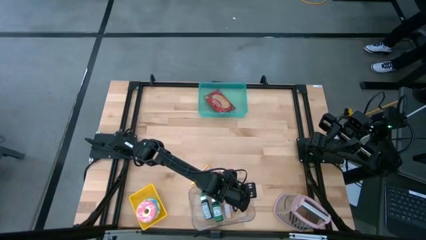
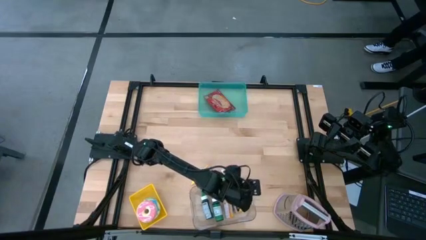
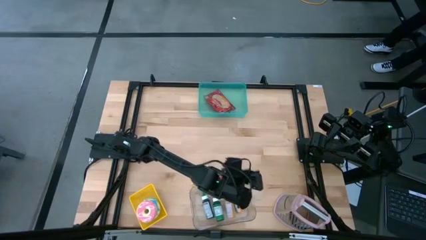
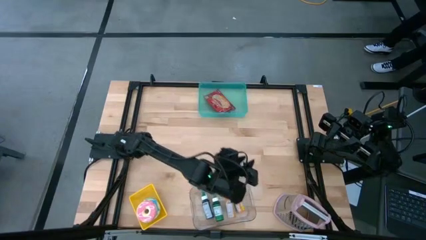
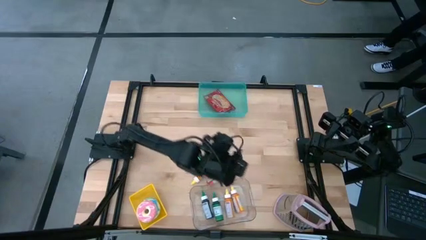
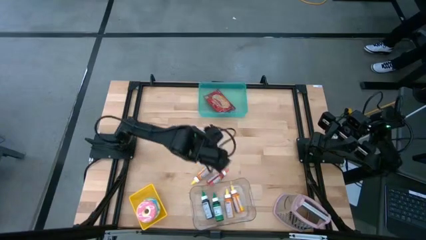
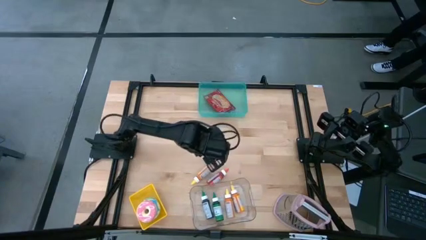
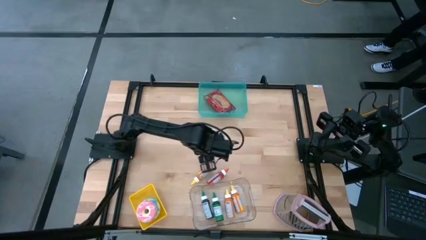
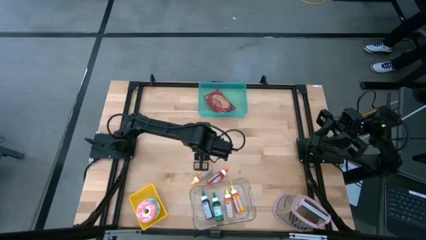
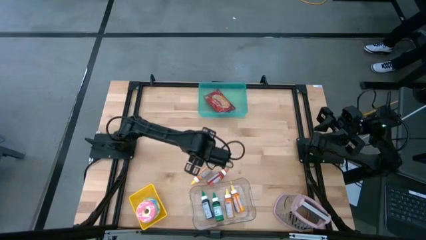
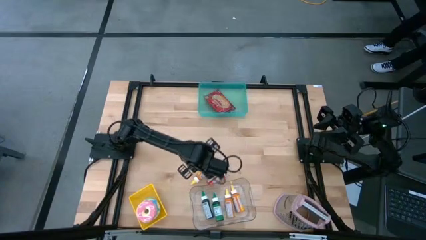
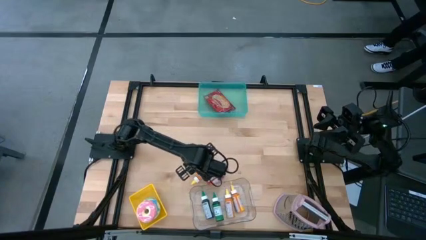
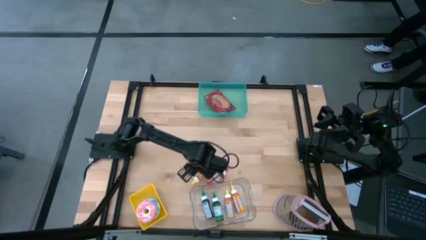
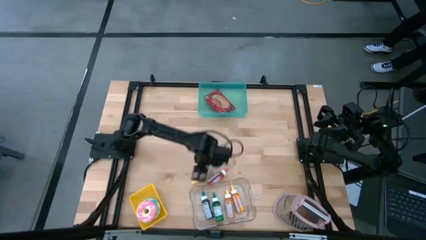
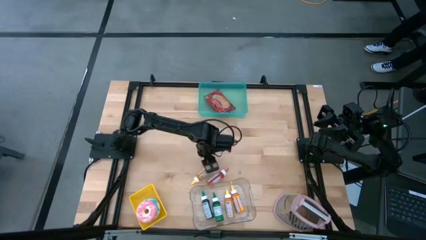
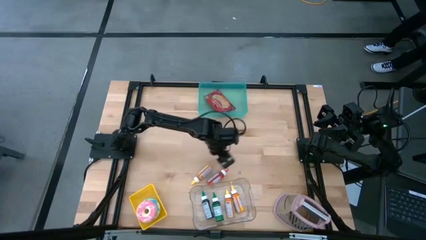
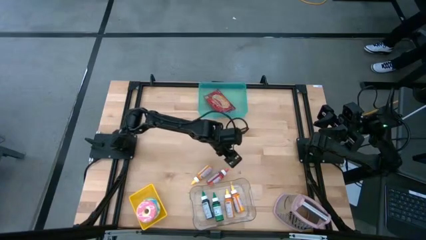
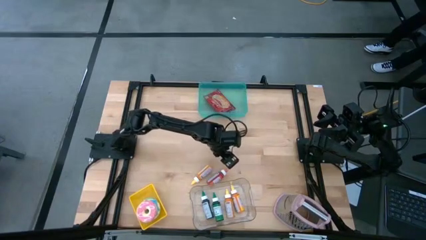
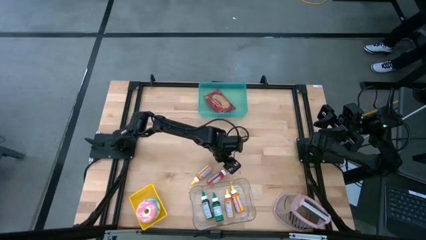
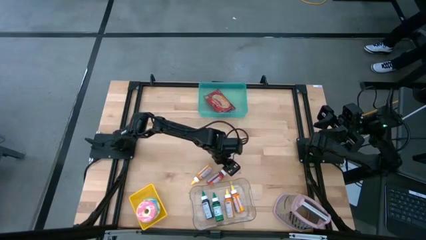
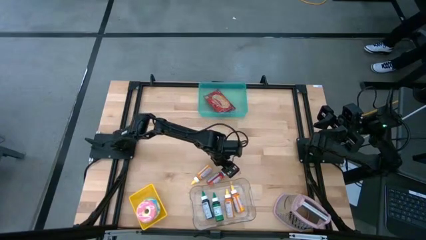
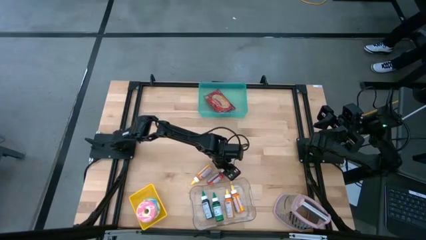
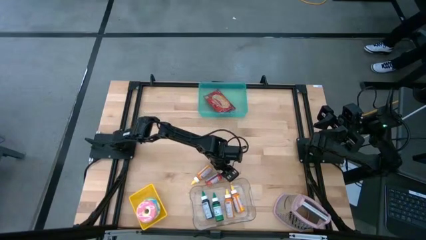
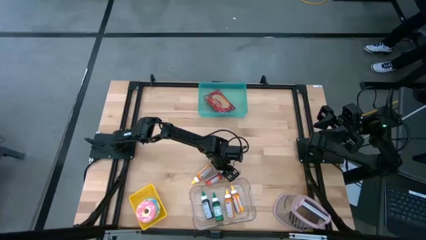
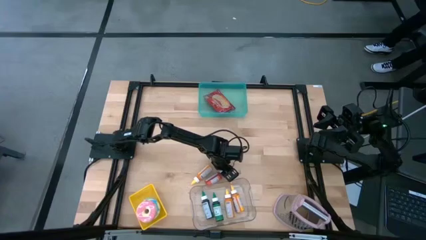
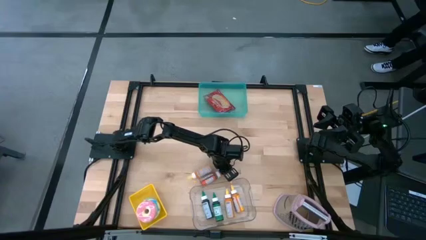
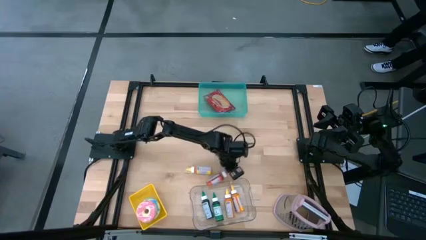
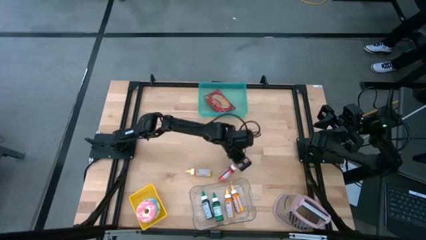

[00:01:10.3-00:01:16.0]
Put the orange food coloring bottle into the transparent bin

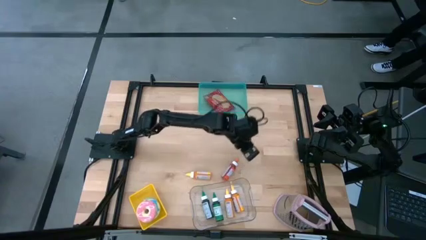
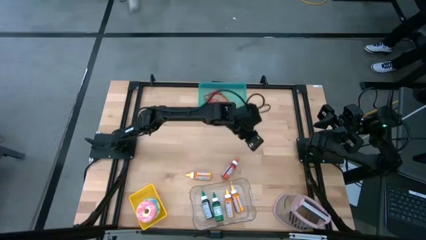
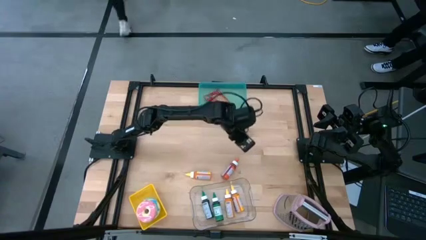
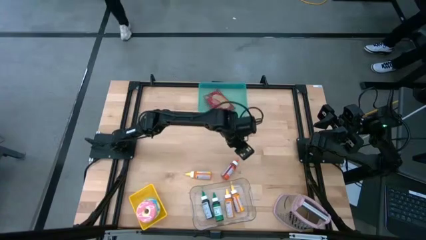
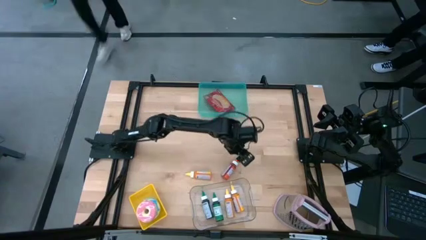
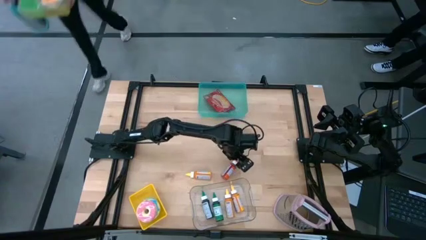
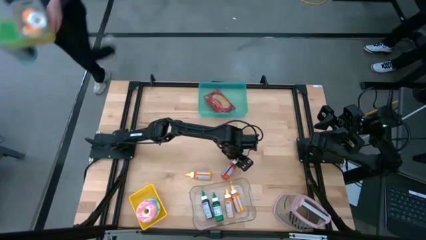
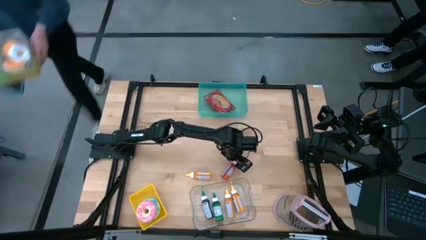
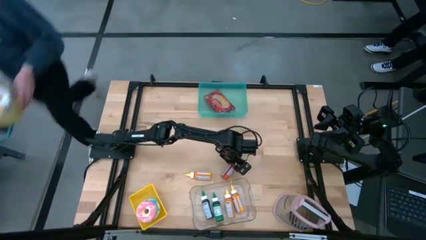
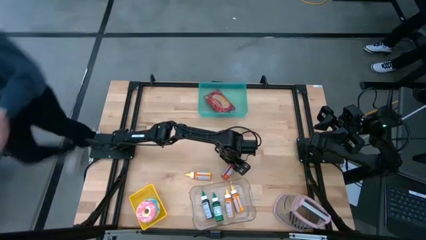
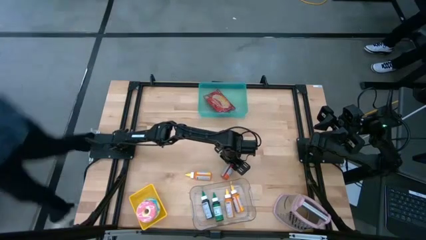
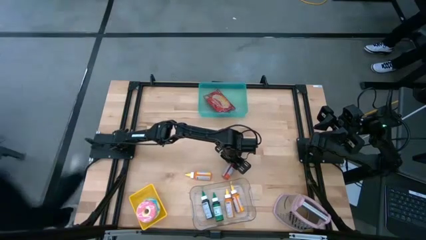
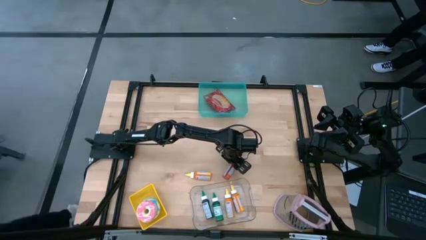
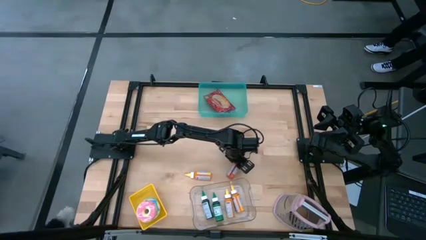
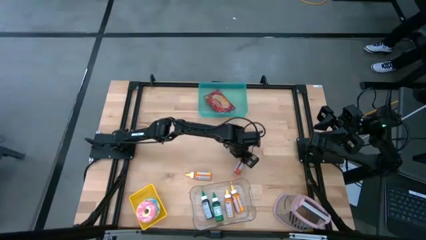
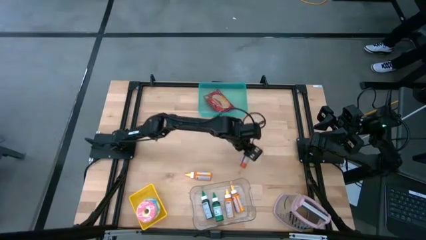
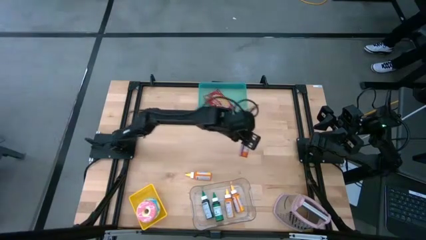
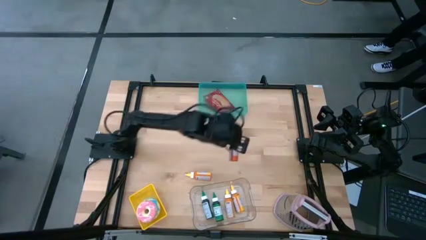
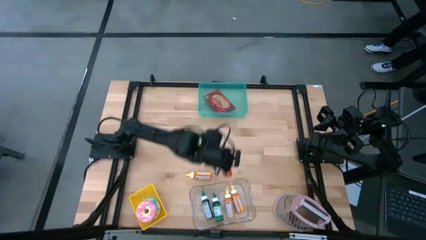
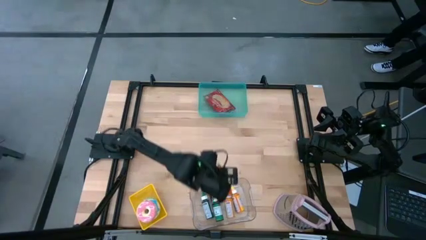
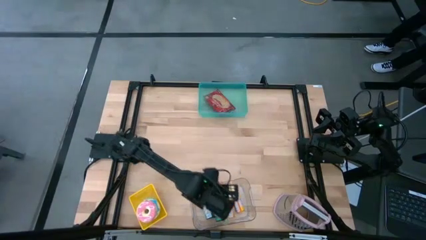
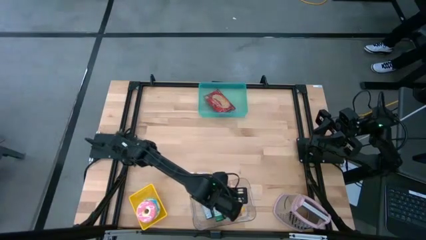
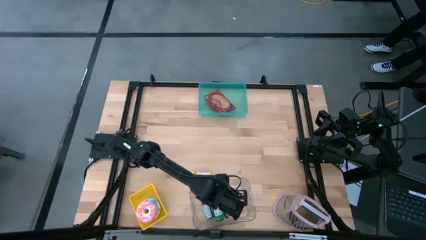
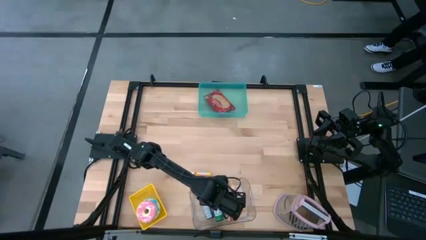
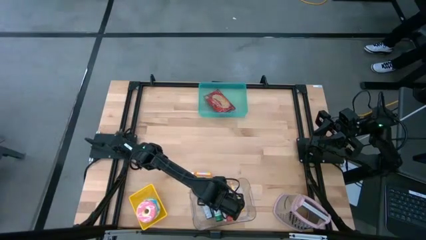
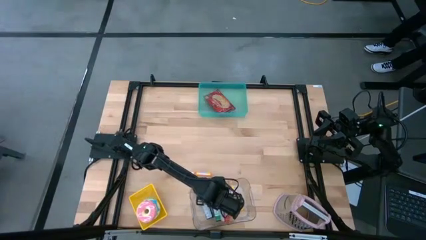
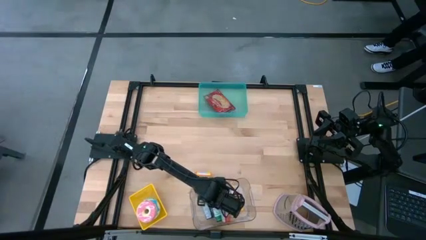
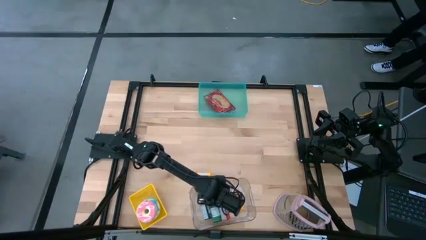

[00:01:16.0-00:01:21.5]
Put the orange food coloring bottle into the transparent bin
